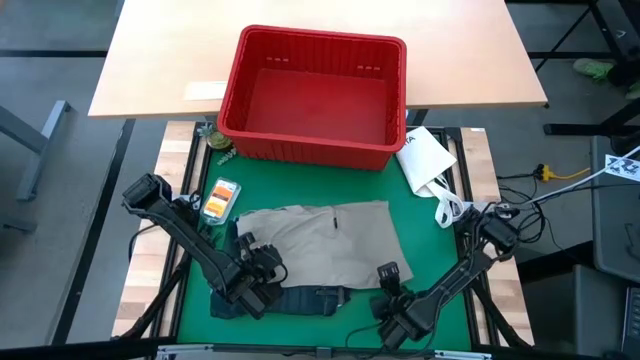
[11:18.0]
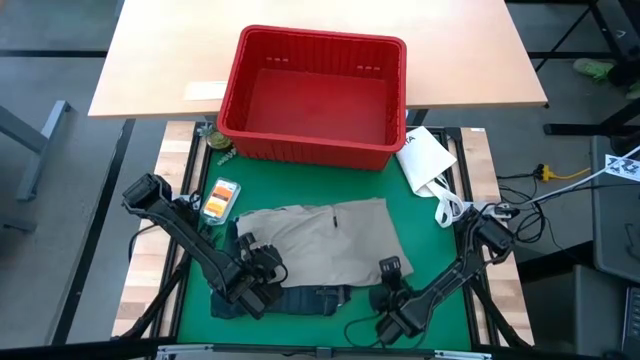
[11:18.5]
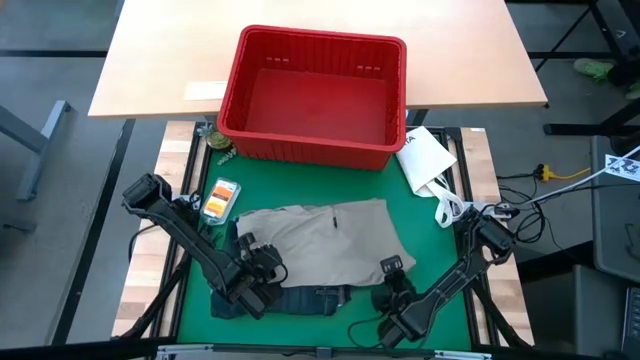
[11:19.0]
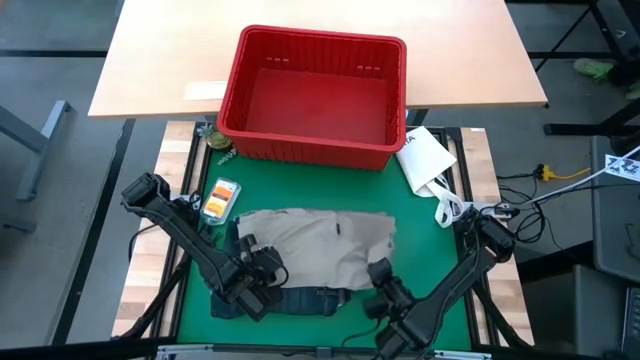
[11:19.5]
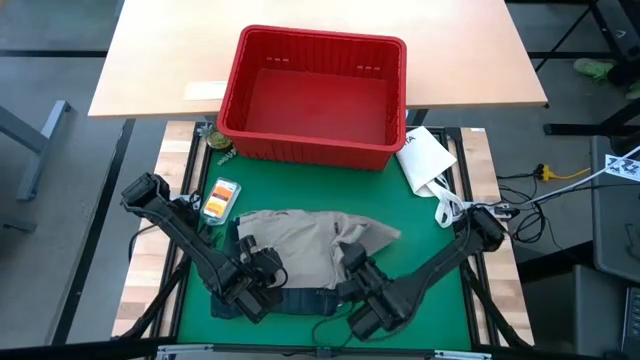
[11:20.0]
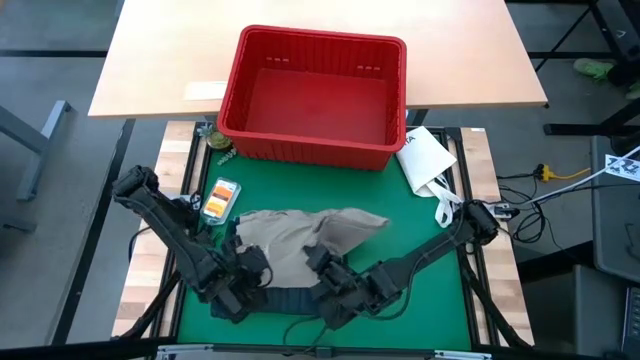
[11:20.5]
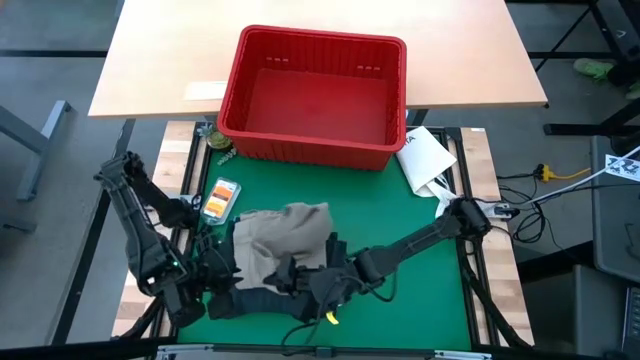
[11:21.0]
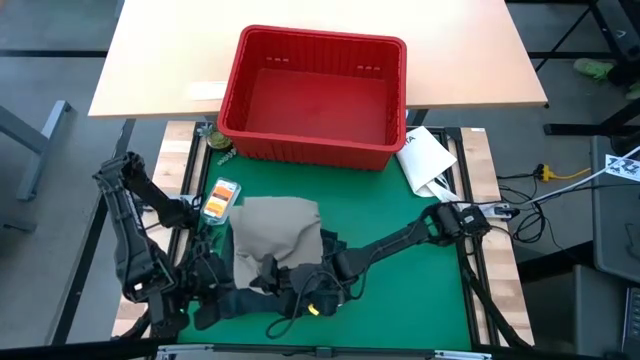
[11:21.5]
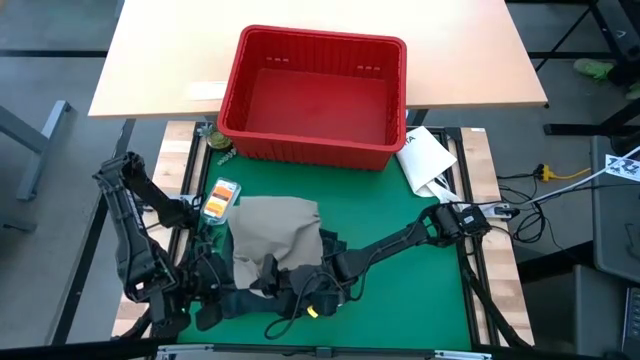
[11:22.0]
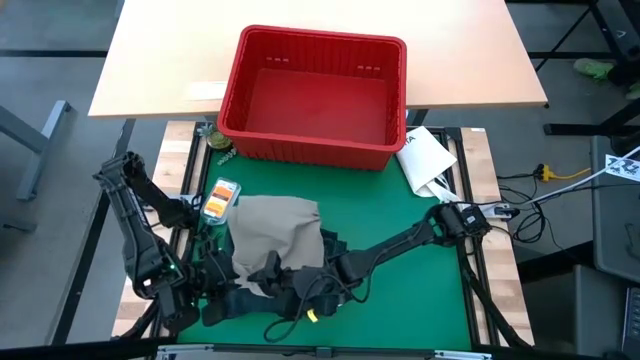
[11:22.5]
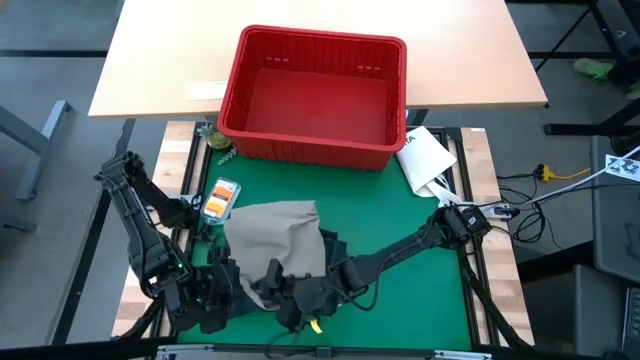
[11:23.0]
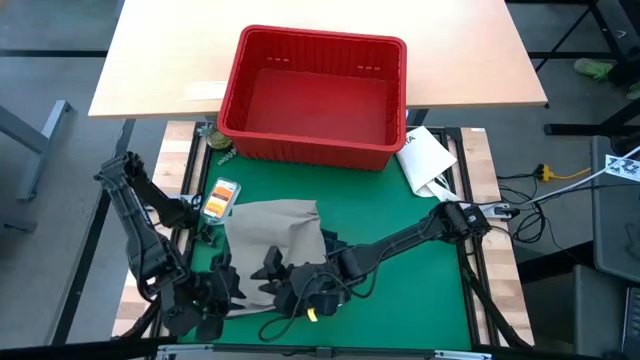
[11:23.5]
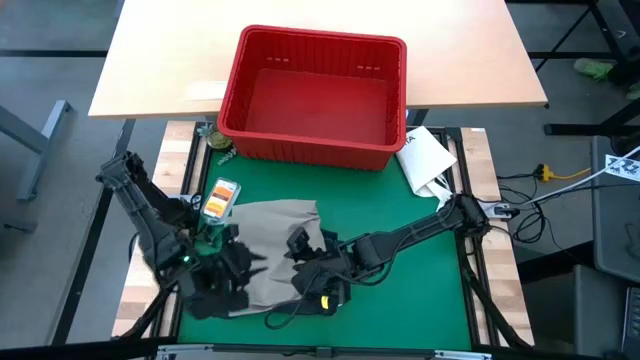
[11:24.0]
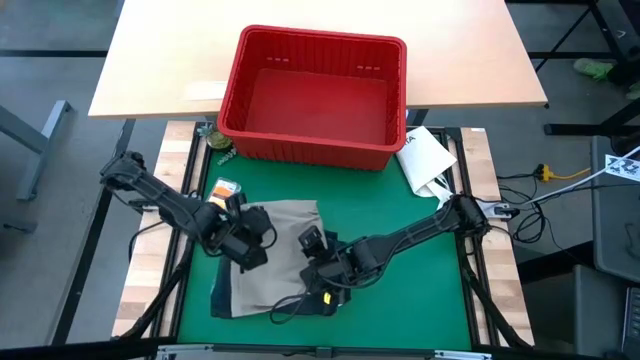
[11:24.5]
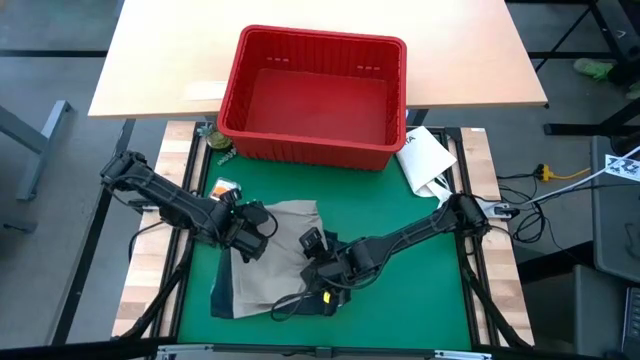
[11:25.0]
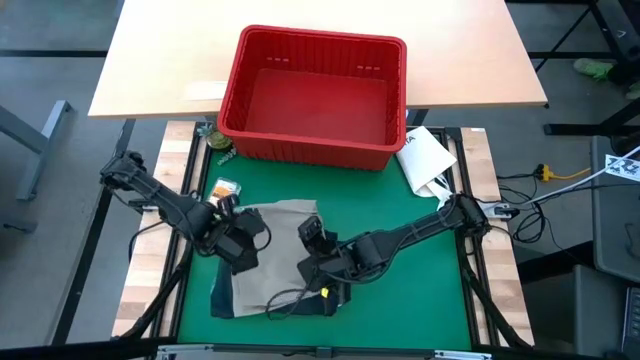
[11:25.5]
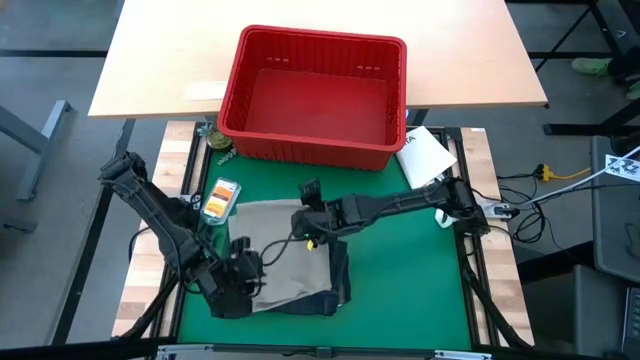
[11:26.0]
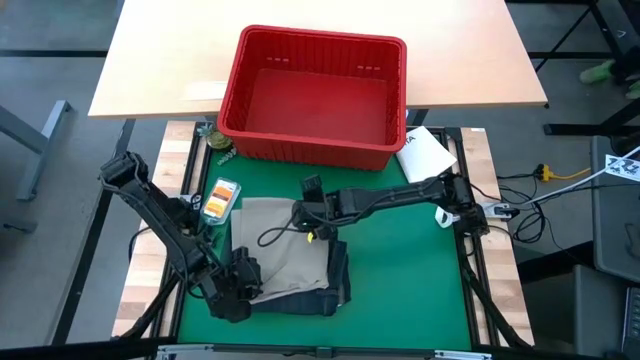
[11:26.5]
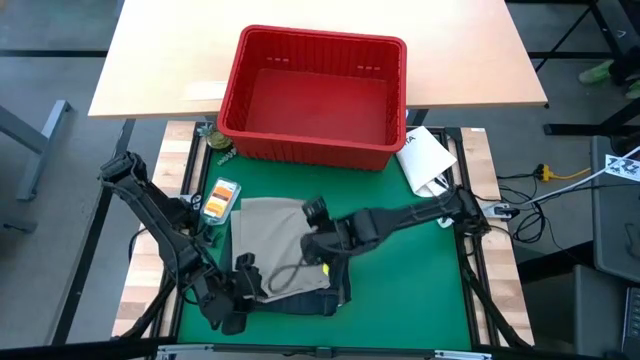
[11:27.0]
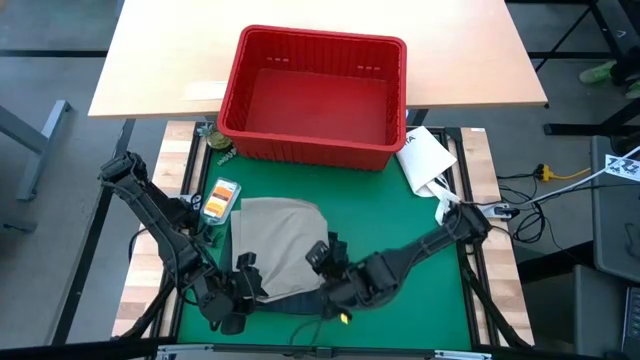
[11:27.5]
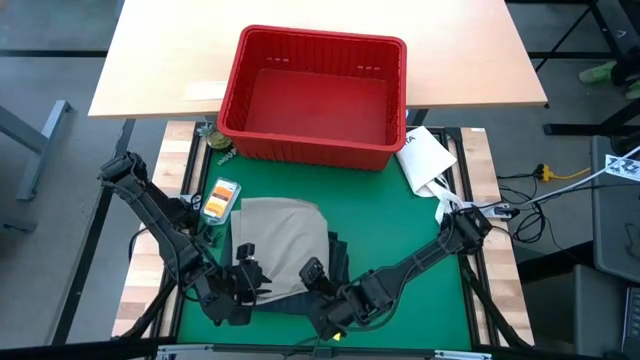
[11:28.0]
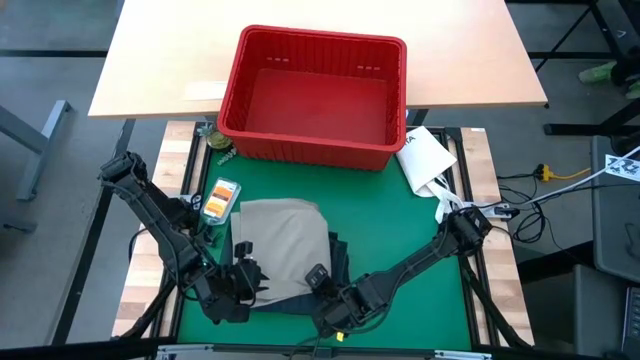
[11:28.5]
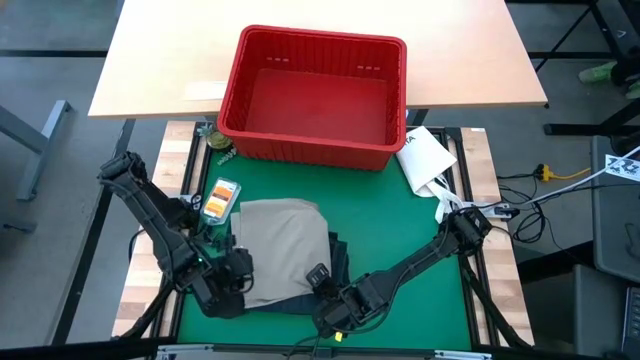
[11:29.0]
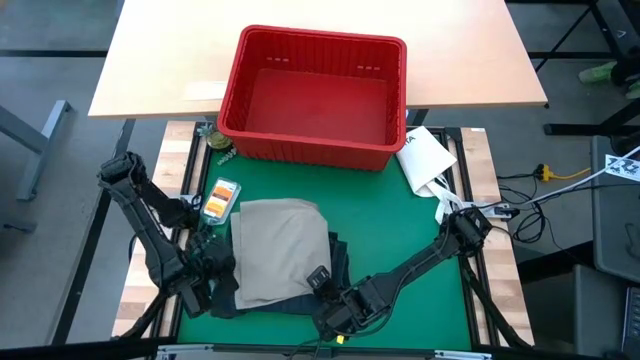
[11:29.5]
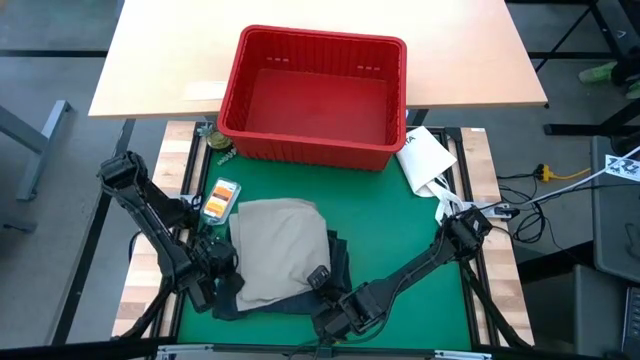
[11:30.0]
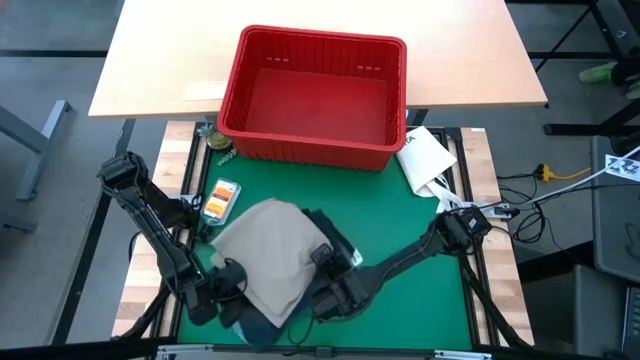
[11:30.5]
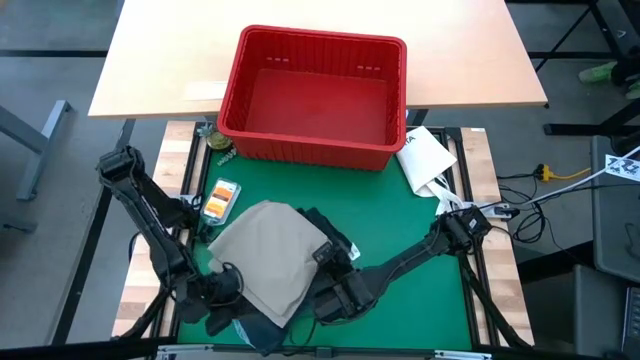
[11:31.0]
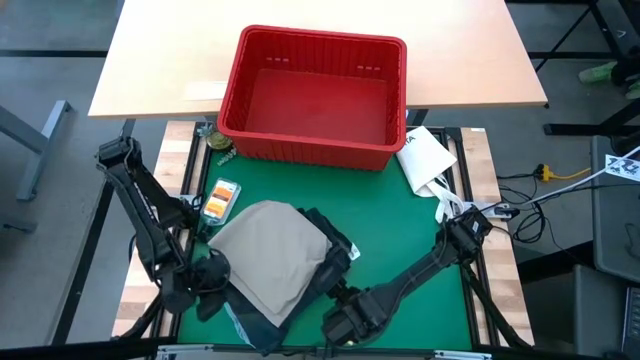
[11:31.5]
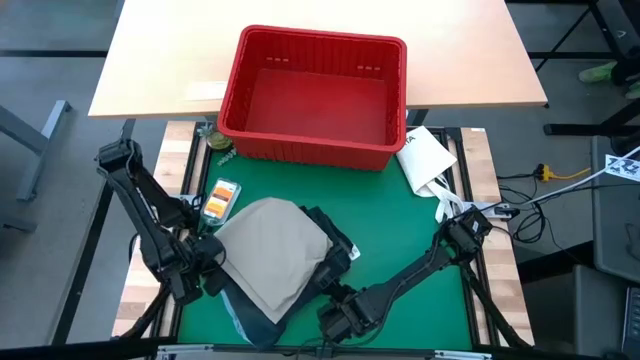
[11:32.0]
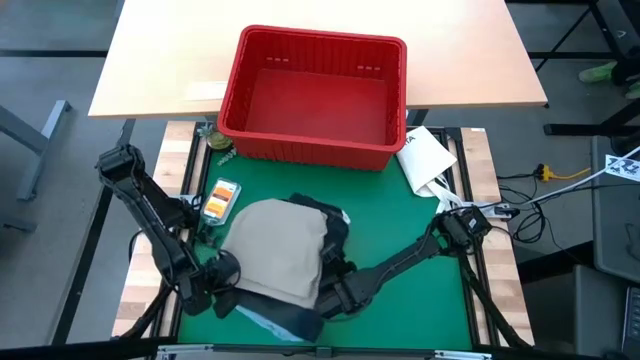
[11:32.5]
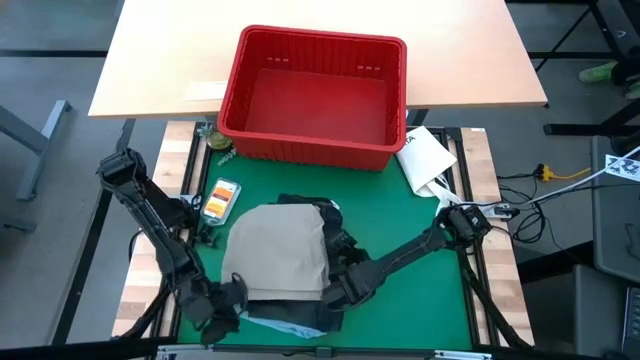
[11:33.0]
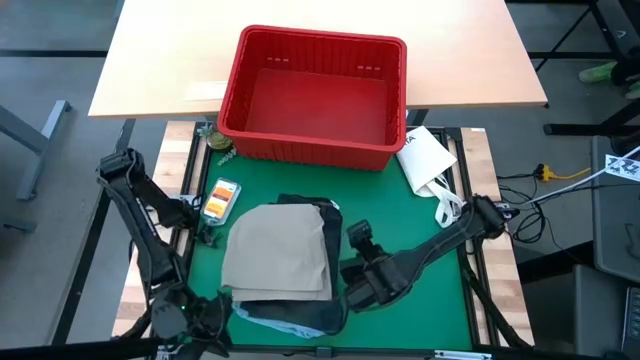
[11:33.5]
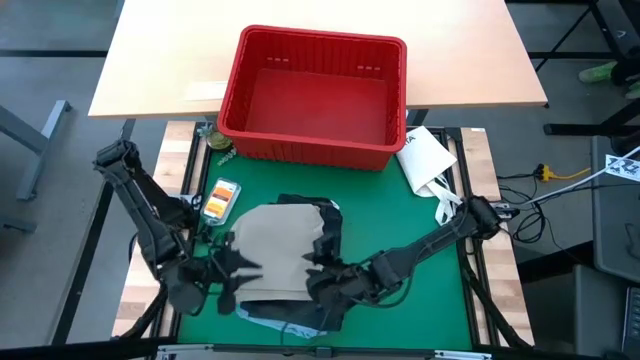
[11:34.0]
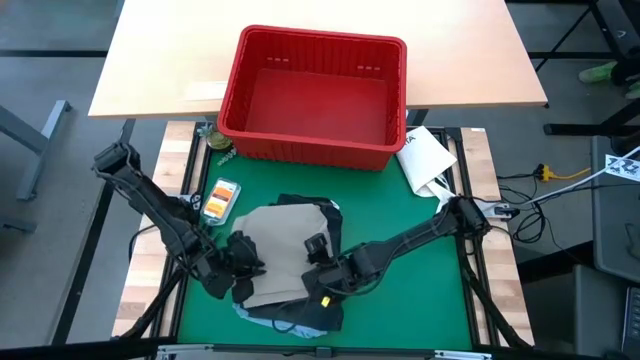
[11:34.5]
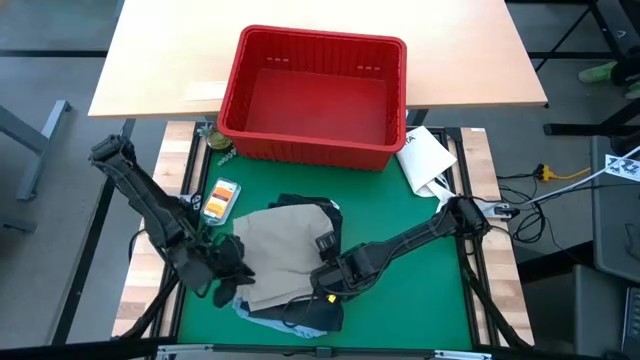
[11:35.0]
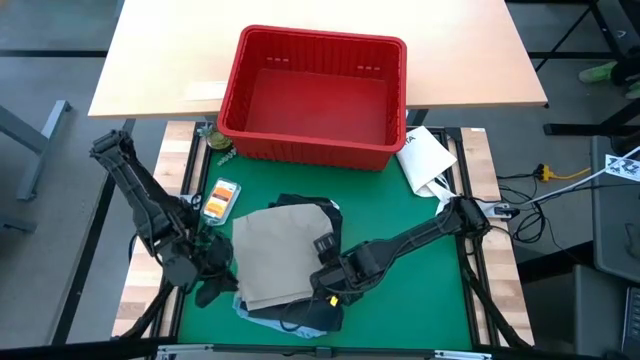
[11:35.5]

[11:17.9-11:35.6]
Task: Fold Laundry from Bin
Fold the gray short

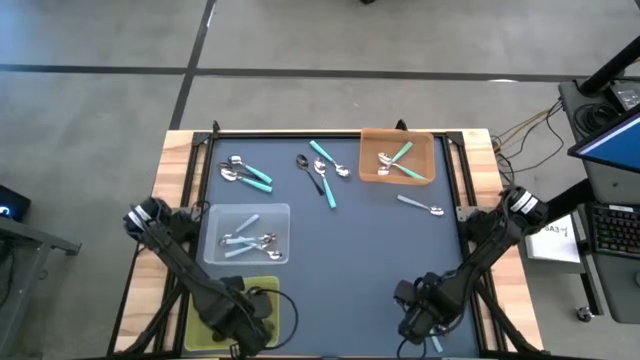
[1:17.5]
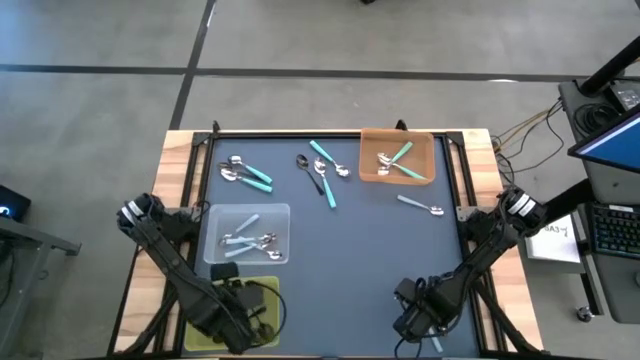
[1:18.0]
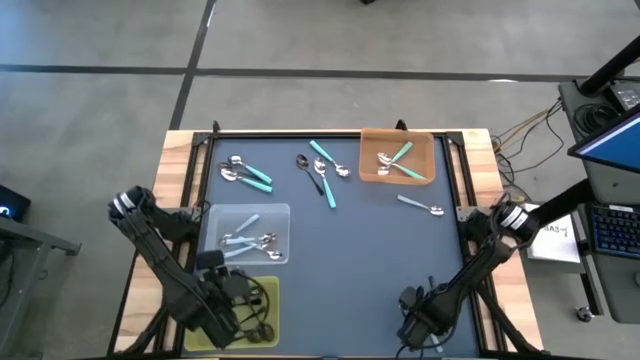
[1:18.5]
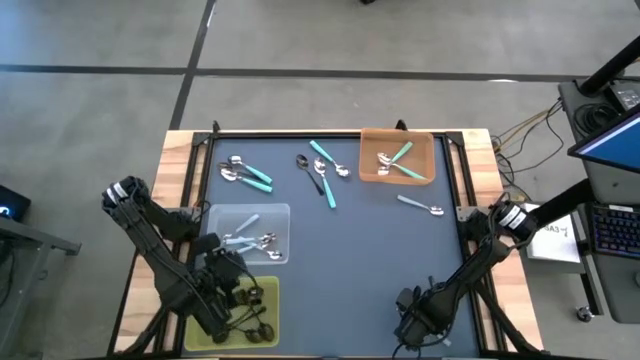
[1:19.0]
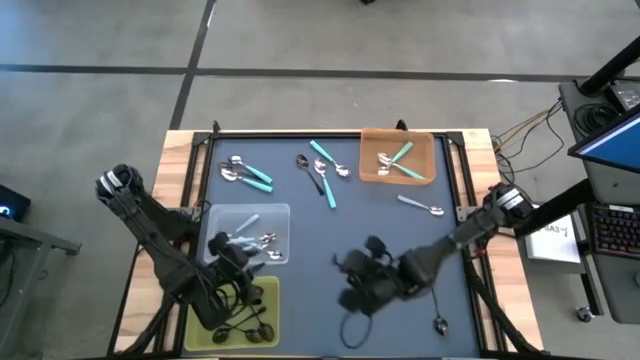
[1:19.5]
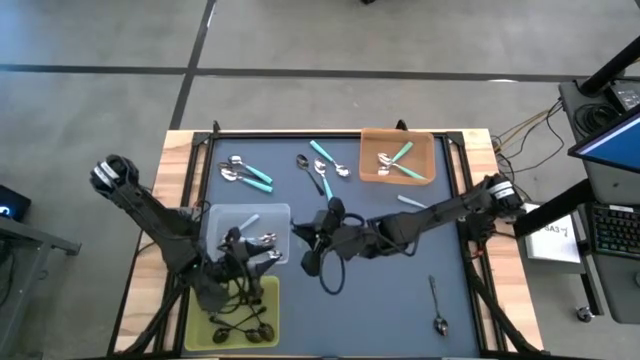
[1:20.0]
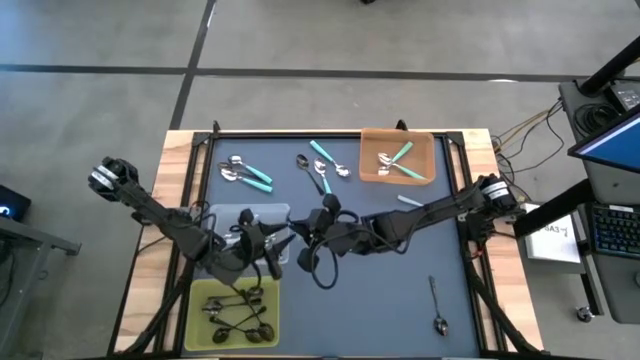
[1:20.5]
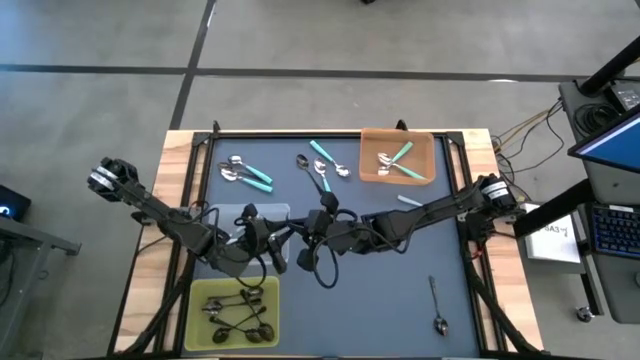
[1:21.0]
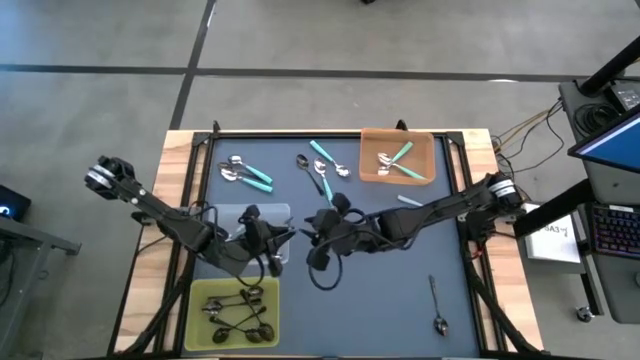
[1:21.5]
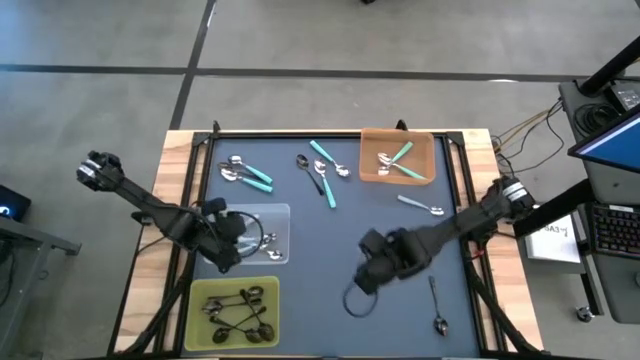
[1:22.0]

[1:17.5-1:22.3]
Task: Sort silverware by color (type)
Put the light blue spoon into the white bin
